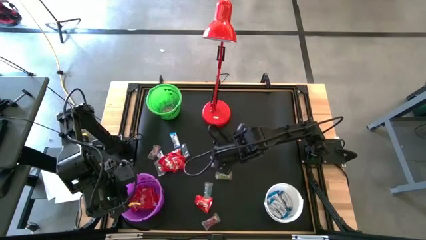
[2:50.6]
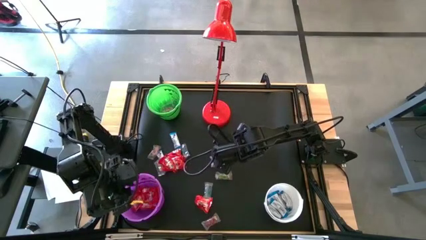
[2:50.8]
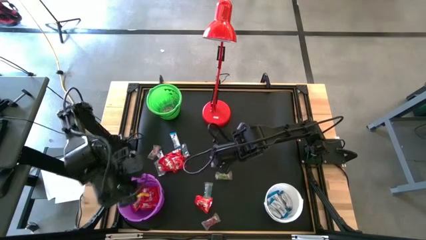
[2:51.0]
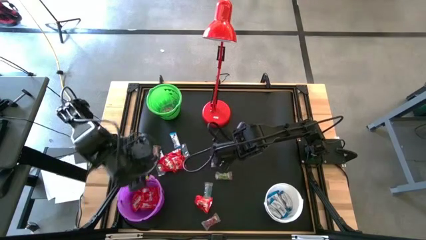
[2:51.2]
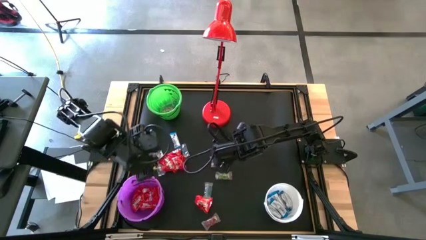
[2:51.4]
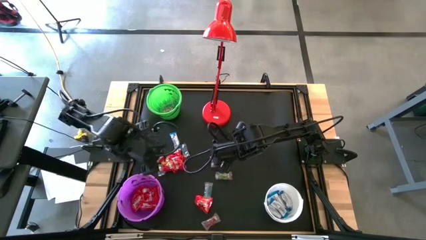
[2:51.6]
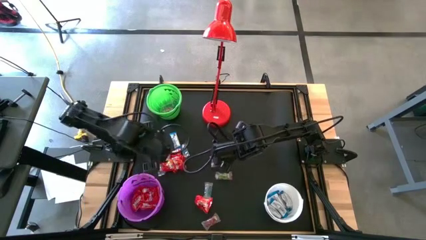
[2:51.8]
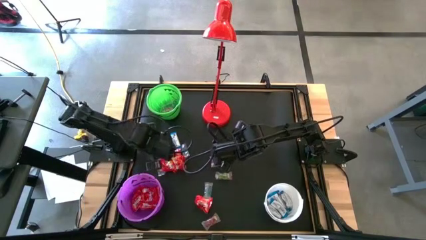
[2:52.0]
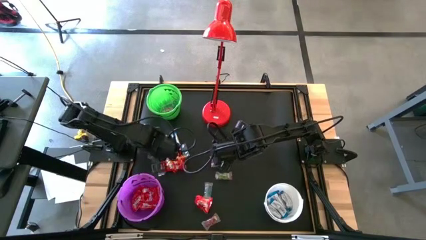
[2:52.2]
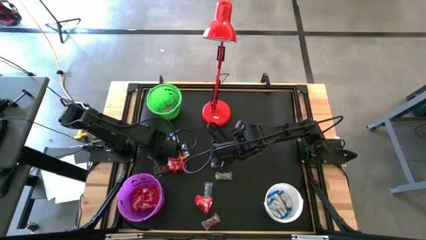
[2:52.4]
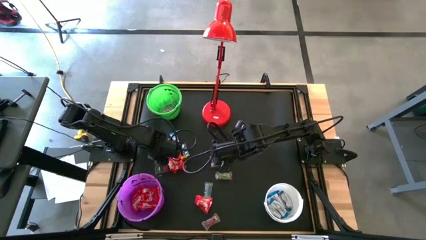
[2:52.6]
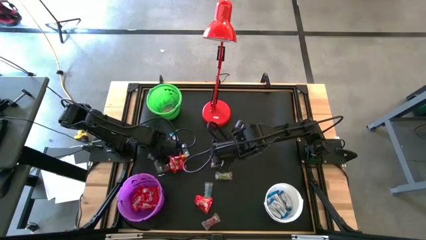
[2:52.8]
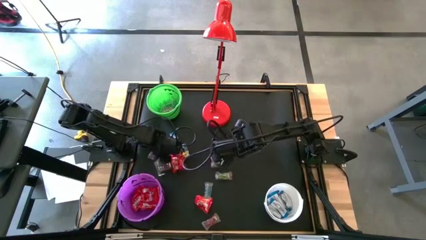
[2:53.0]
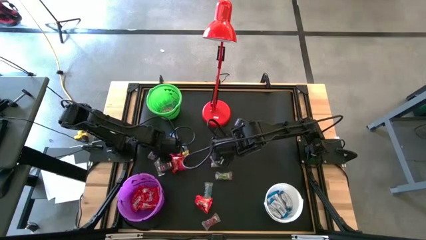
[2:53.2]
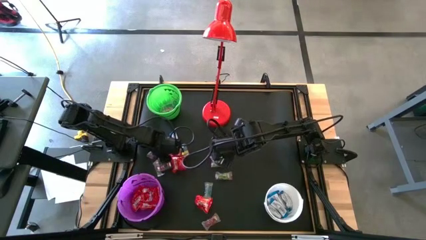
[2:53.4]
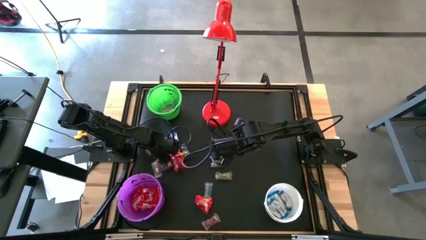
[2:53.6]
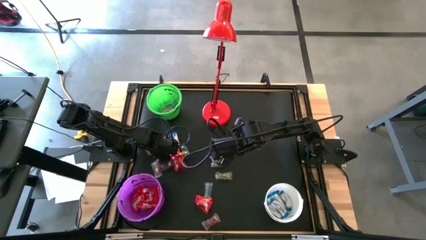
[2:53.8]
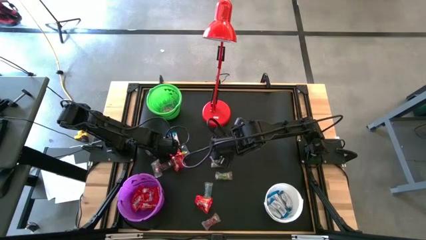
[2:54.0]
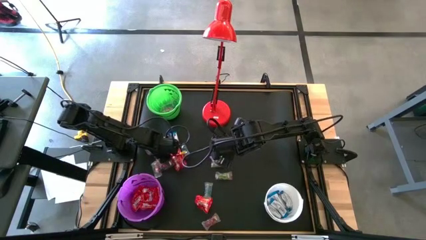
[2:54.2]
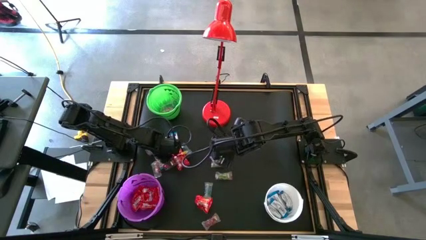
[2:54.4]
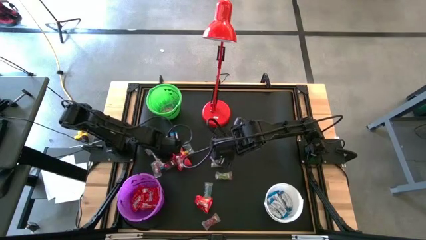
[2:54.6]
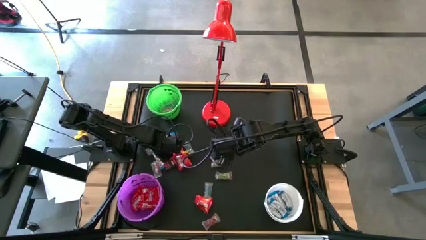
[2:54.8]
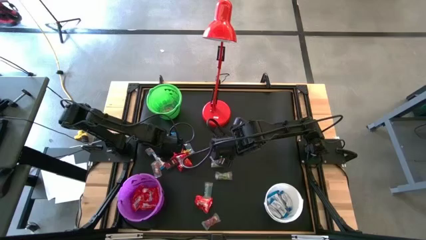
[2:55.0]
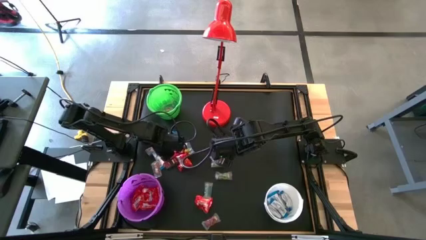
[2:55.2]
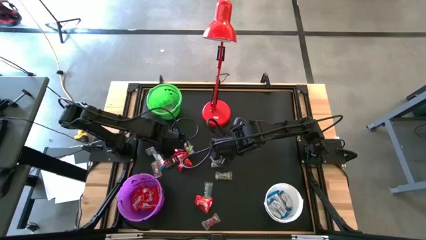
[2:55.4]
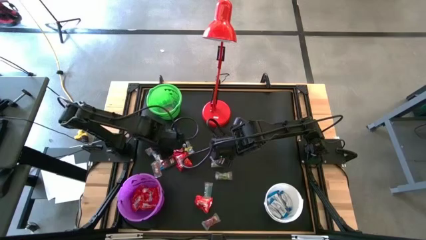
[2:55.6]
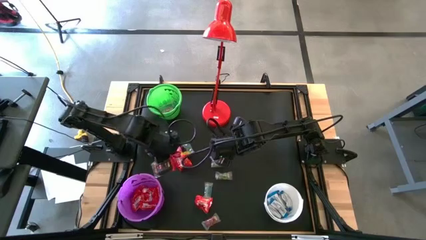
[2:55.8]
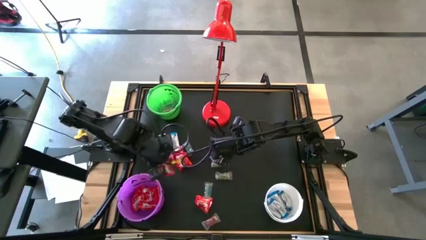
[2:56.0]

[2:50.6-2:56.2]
Task: Sort candy
Put the red candy into the purple bucket

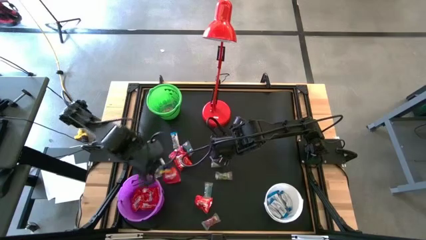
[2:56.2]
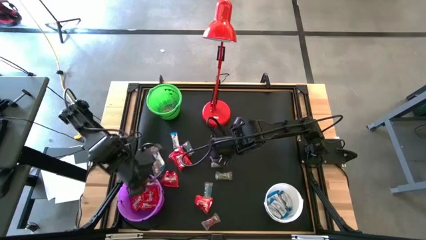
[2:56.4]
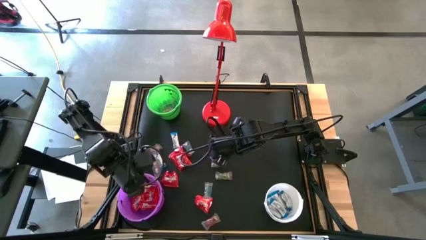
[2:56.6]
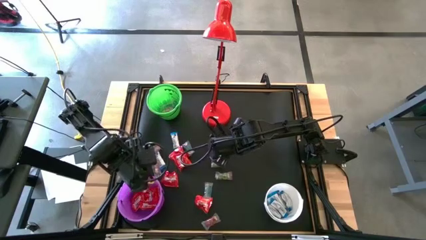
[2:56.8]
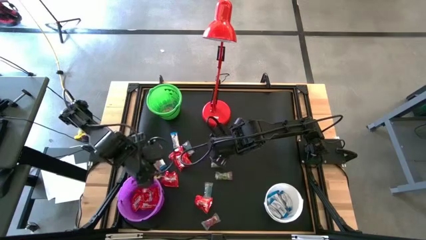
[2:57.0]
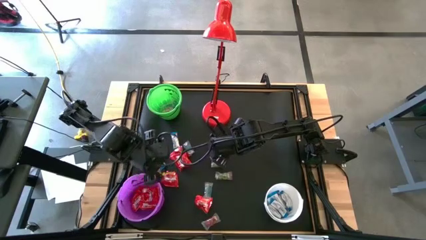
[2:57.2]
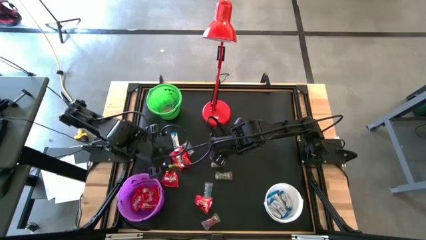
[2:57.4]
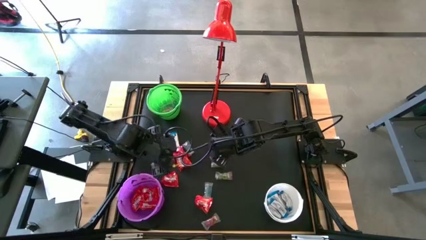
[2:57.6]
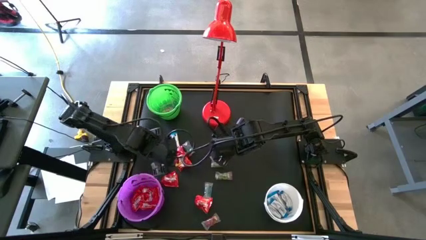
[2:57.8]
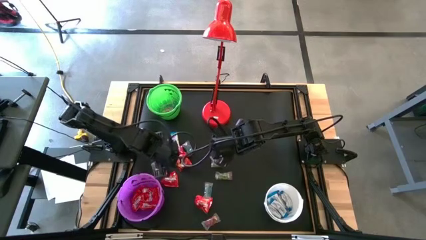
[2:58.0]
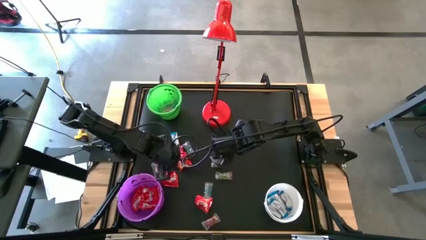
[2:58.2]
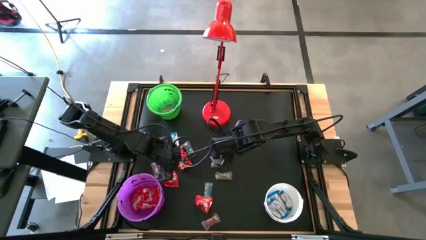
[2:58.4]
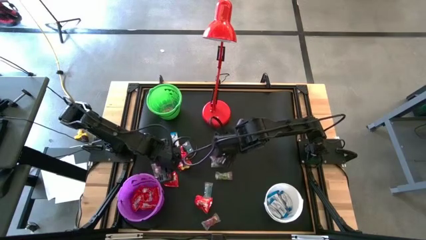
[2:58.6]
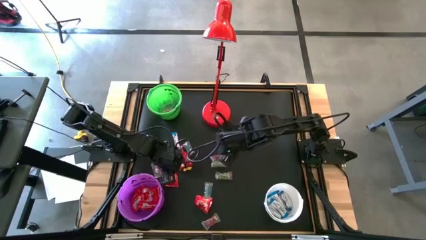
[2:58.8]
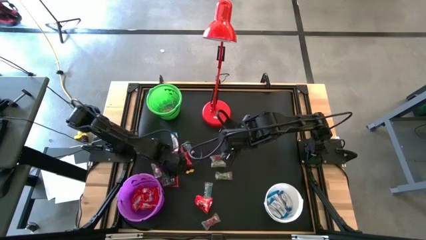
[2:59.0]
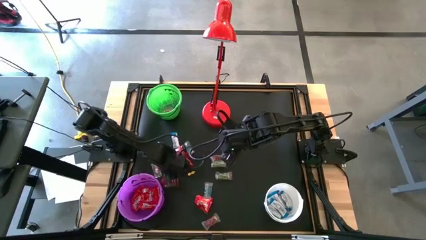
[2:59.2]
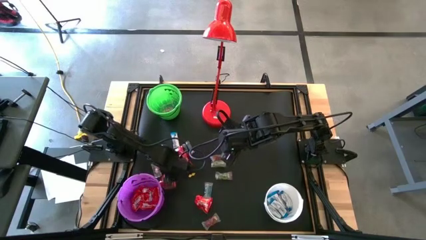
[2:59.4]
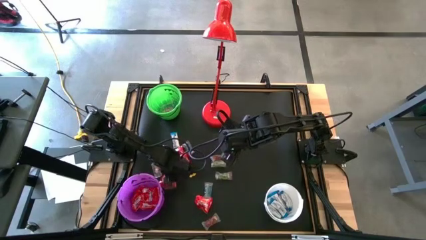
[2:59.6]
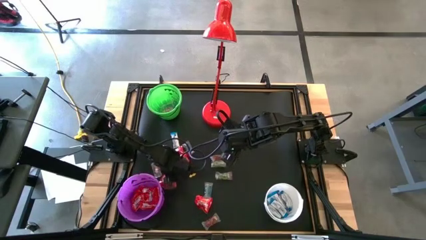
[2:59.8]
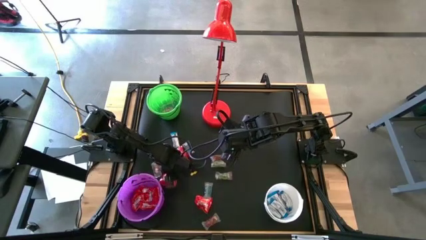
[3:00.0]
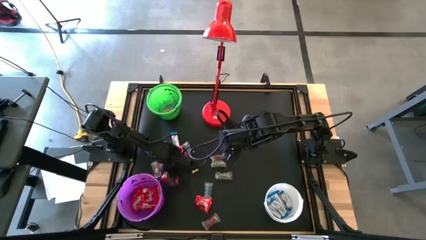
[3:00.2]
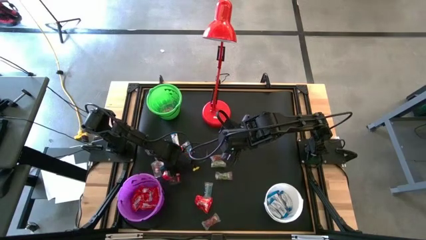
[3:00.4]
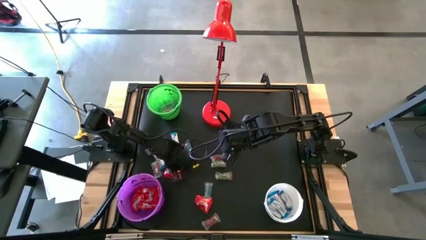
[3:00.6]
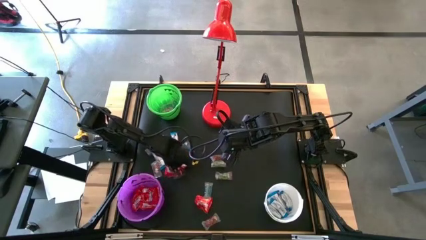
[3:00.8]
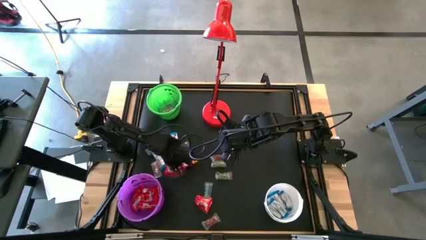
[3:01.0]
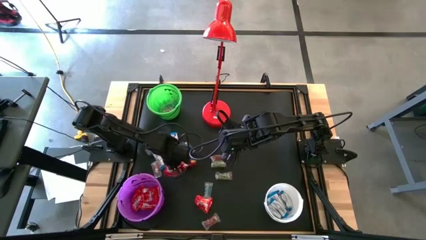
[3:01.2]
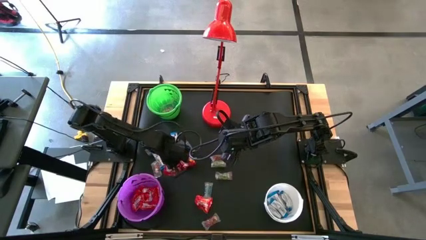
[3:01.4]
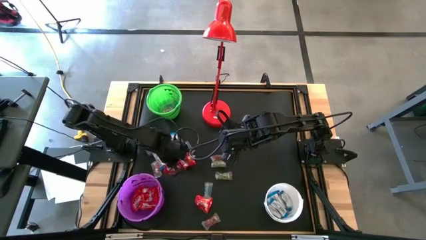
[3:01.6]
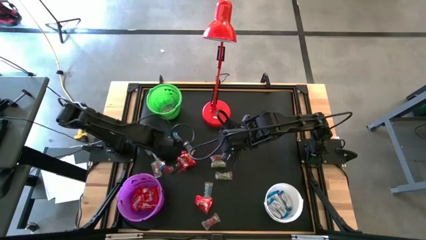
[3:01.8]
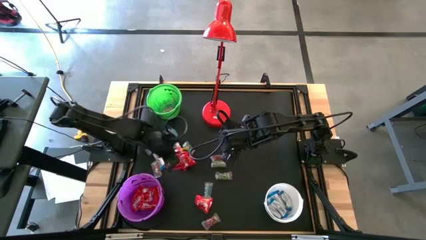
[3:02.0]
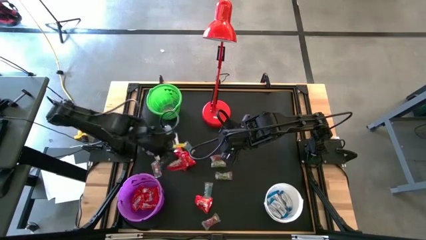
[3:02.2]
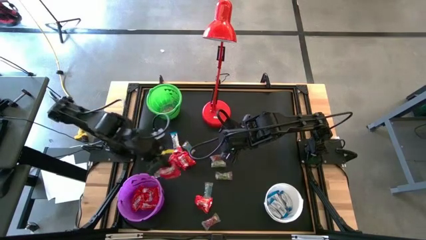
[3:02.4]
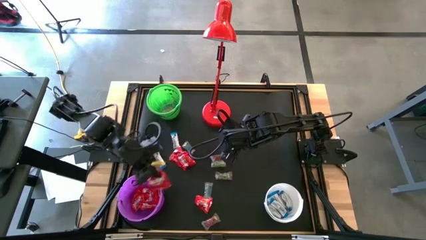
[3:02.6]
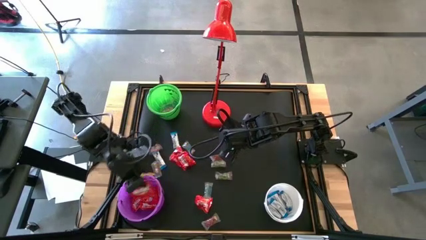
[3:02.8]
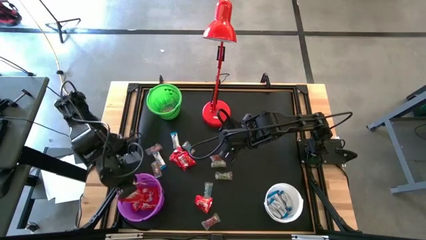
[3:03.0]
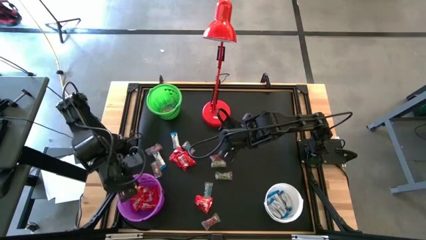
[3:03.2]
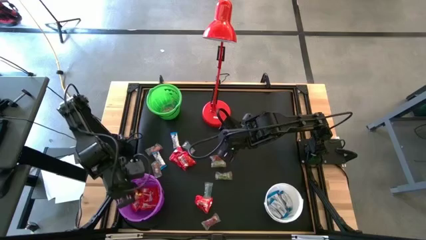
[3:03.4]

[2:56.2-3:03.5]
Put the red candy into the purple bucket

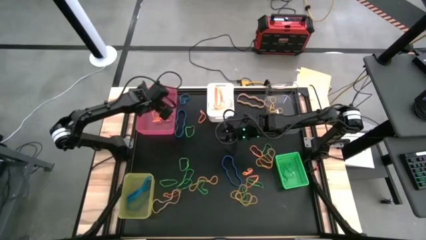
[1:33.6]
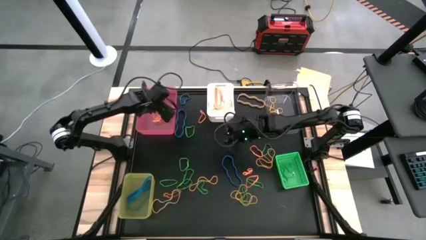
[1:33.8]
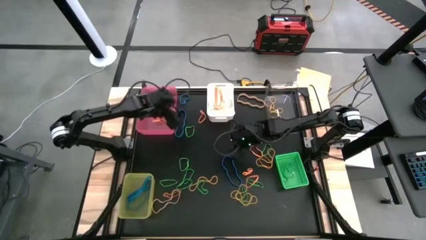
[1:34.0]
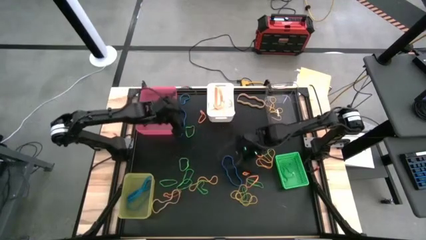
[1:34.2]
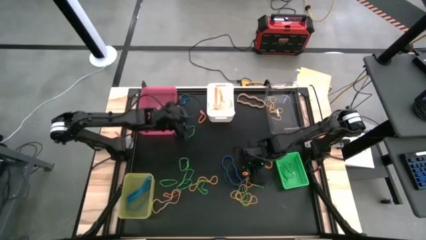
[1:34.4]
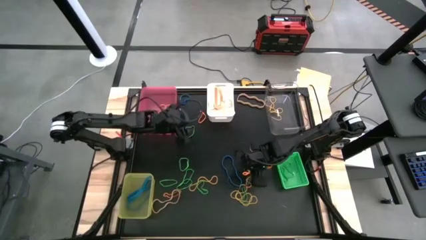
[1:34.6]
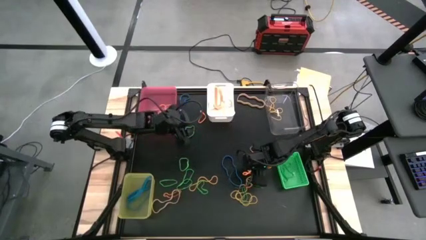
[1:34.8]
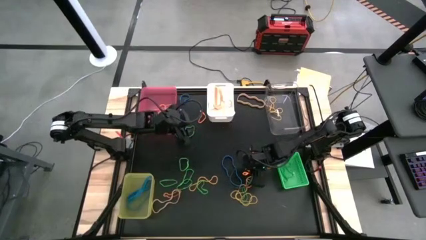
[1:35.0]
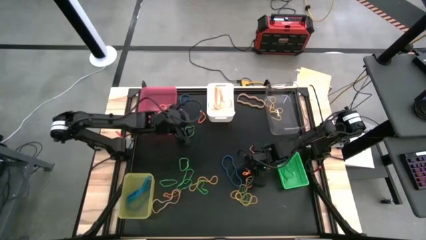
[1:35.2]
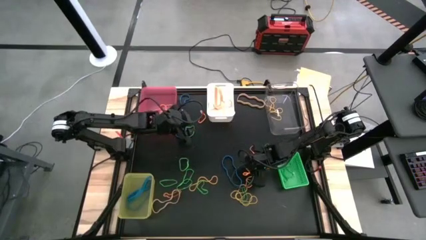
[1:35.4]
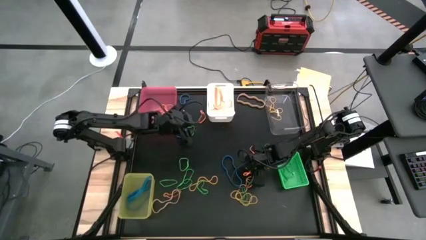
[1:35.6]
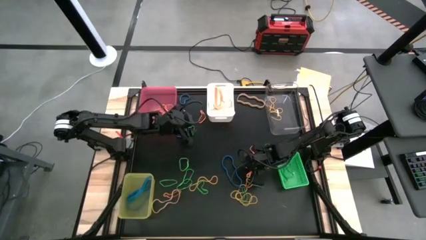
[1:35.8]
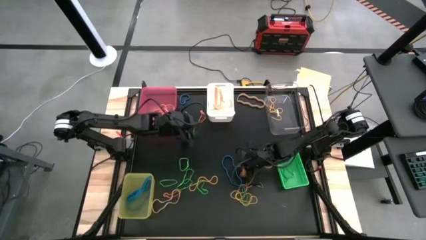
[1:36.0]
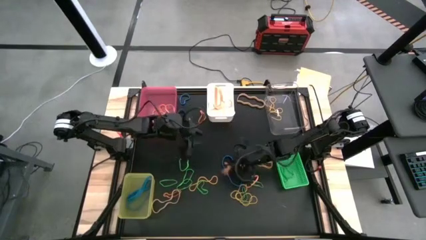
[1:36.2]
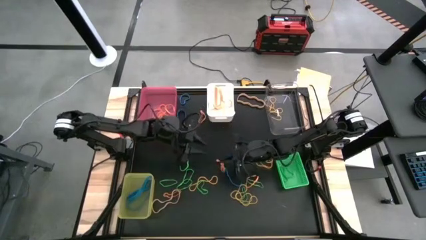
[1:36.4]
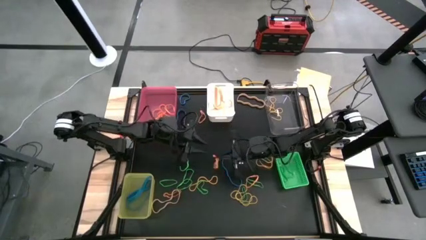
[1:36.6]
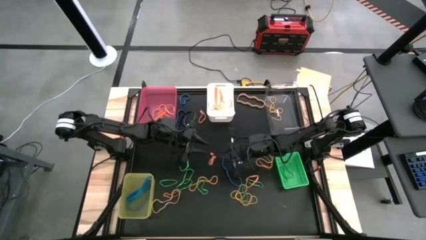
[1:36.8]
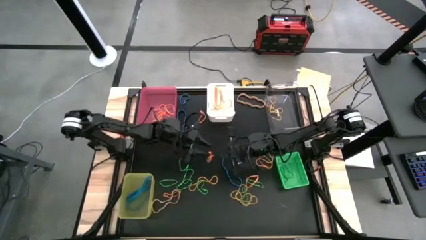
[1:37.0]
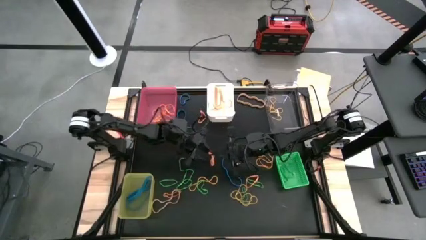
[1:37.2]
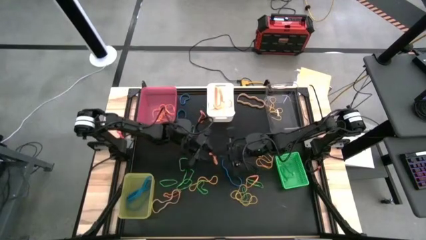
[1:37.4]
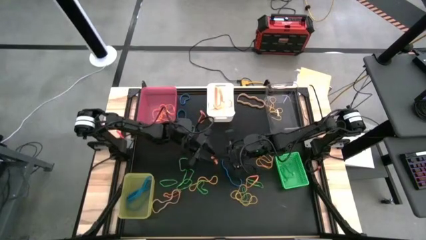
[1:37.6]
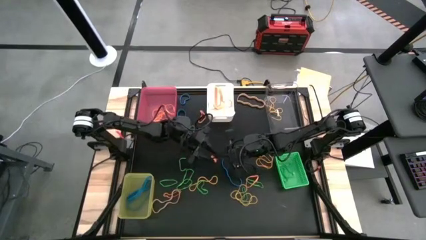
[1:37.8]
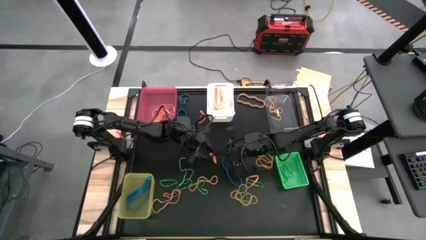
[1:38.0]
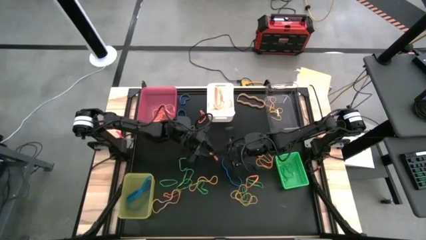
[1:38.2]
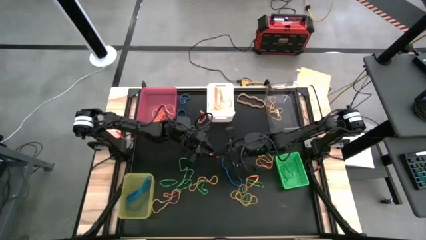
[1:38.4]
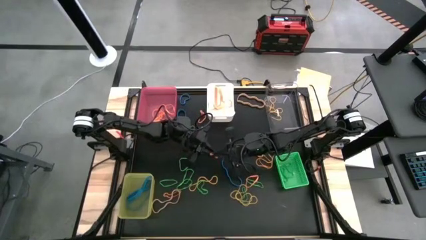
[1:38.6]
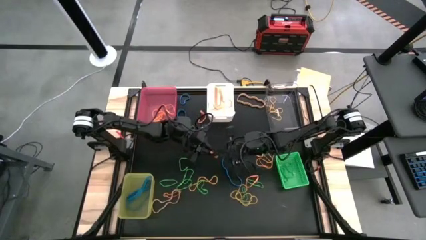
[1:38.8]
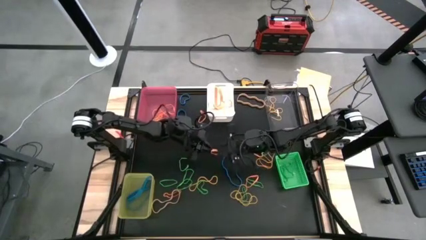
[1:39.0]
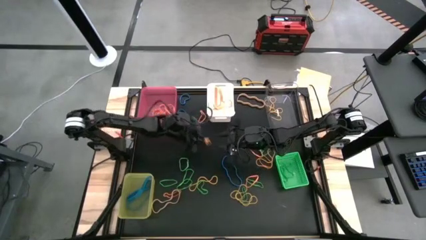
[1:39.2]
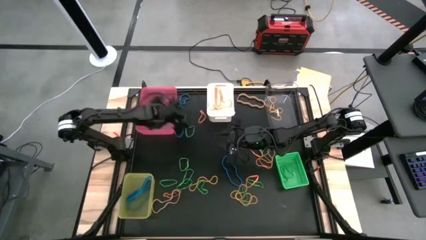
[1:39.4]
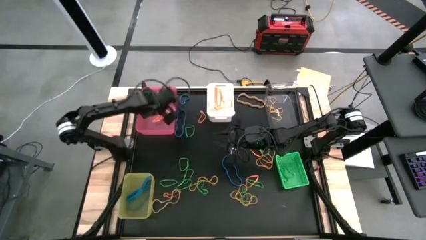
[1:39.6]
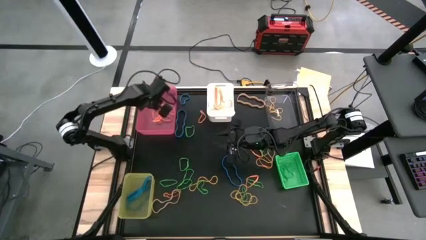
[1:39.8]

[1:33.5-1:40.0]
Task: Sort rubber bands into baskets
Put the orange rubber band into the pink bin
